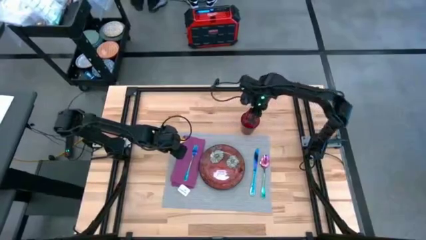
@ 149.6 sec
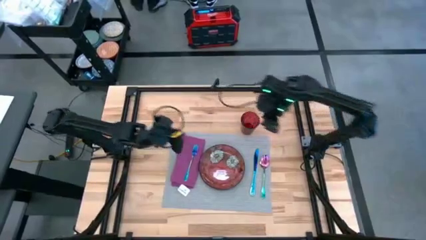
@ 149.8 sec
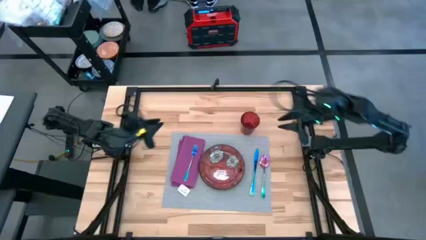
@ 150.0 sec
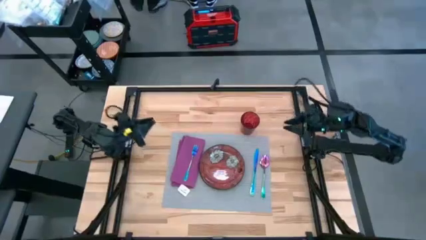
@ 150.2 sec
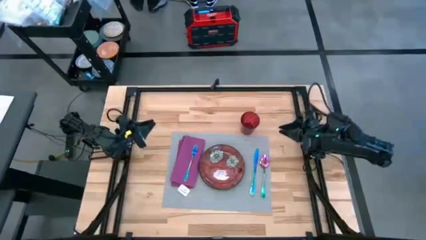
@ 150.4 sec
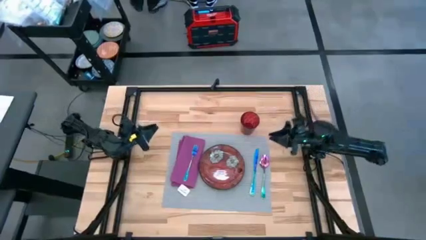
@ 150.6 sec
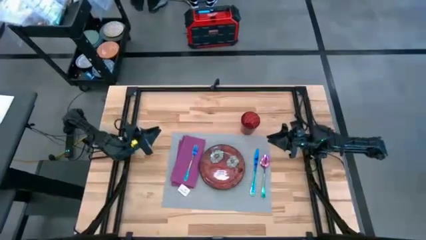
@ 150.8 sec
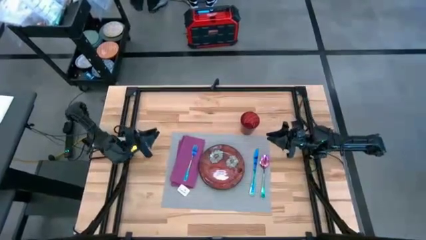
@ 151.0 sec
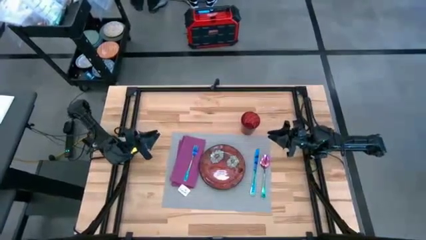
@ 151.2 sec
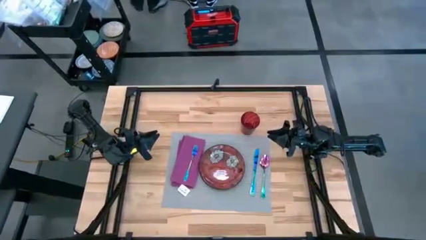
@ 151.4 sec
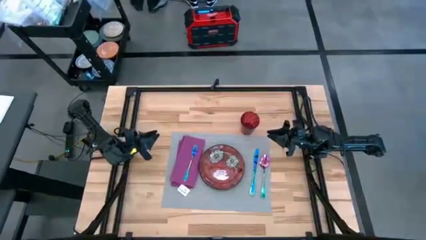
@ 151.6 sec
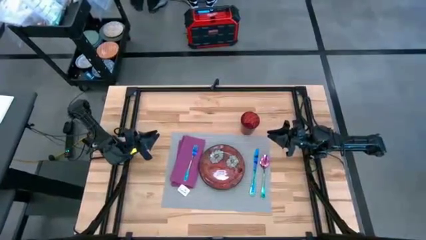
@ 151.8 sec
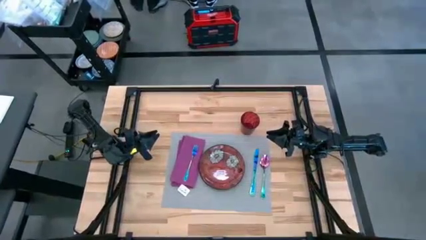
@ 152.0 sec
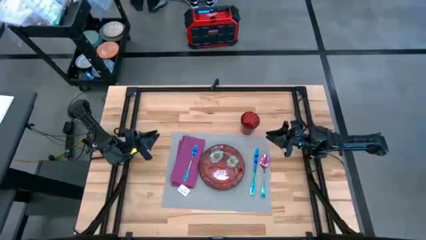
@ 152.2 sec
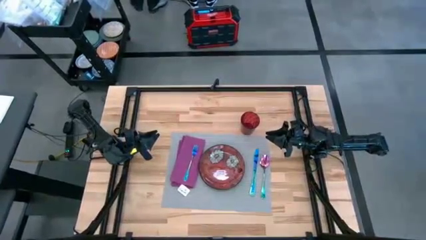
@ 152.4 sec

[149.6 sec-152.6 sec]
Task: Set table place
Return to Home Position

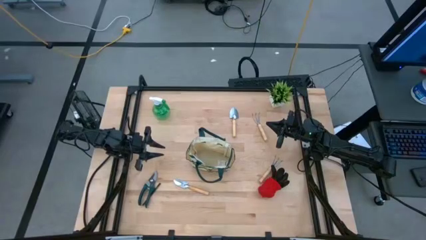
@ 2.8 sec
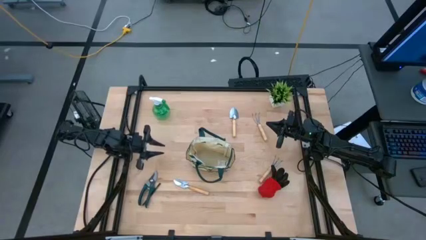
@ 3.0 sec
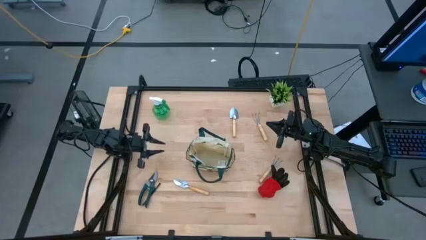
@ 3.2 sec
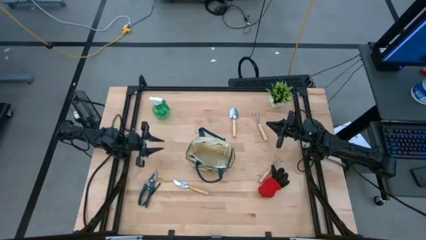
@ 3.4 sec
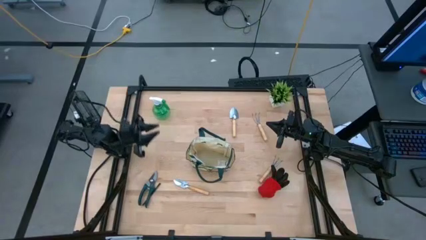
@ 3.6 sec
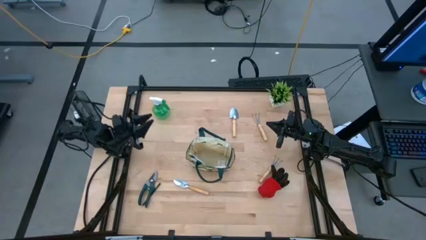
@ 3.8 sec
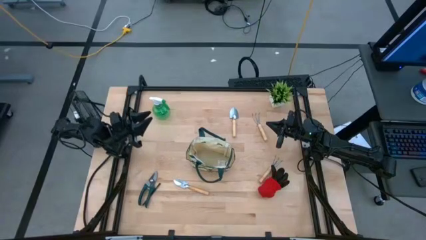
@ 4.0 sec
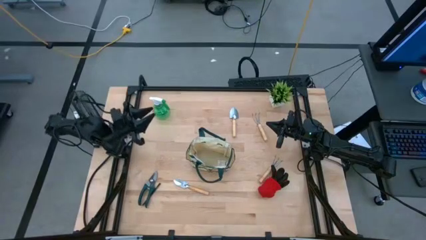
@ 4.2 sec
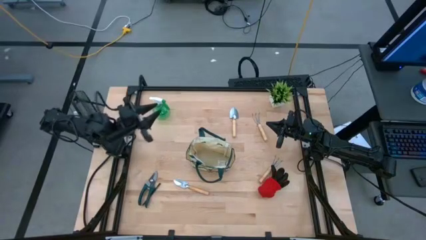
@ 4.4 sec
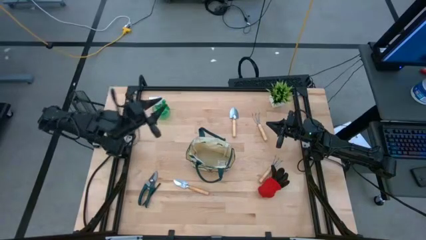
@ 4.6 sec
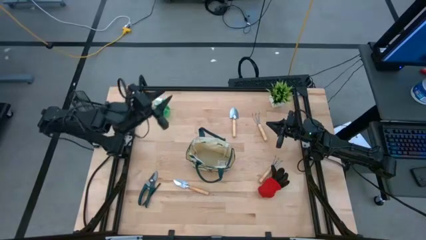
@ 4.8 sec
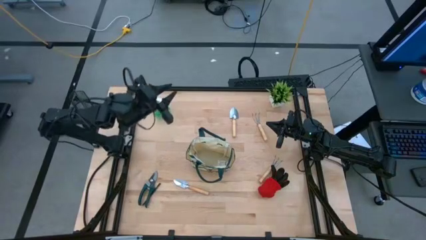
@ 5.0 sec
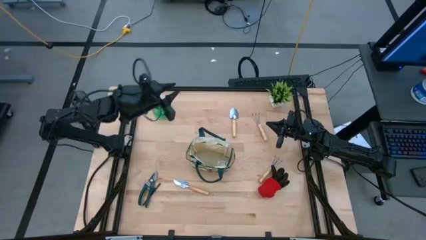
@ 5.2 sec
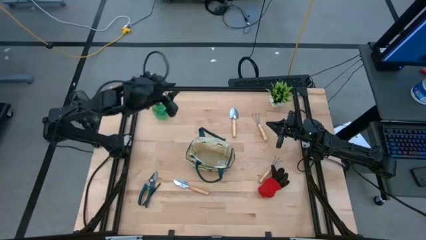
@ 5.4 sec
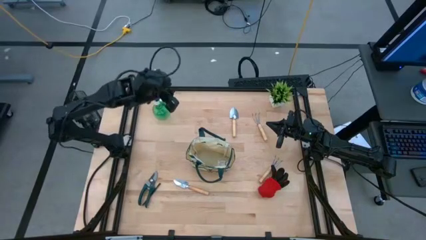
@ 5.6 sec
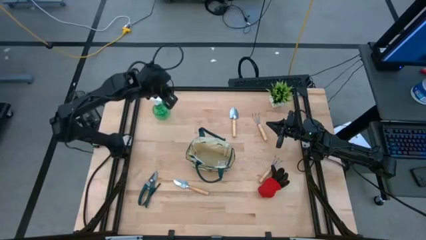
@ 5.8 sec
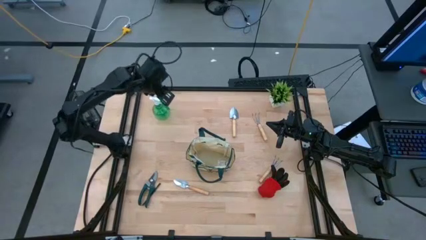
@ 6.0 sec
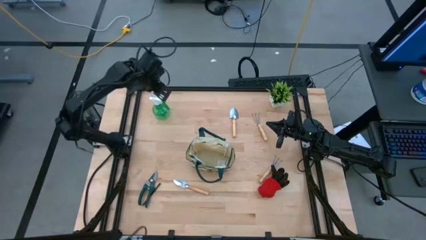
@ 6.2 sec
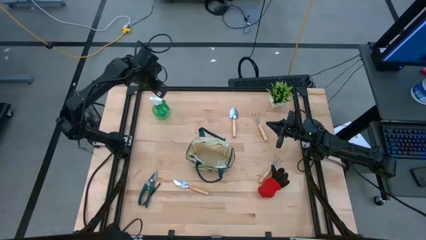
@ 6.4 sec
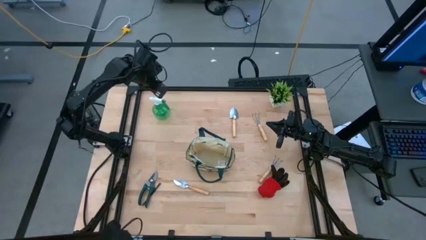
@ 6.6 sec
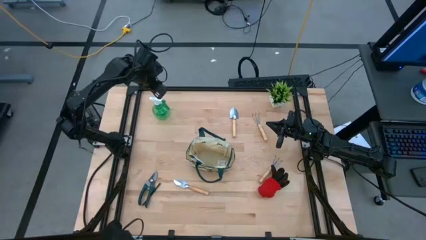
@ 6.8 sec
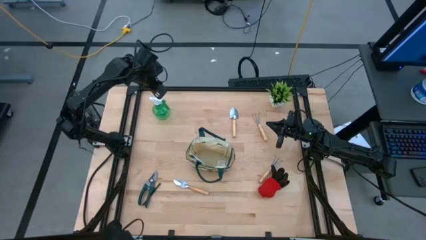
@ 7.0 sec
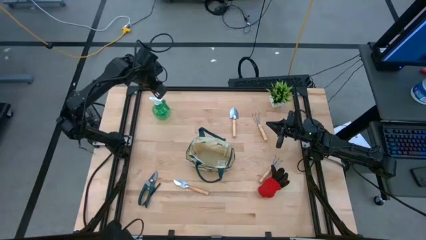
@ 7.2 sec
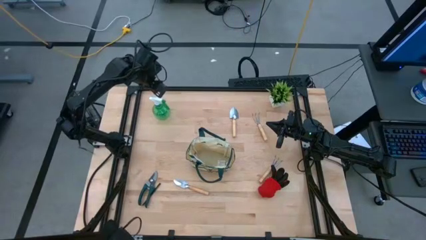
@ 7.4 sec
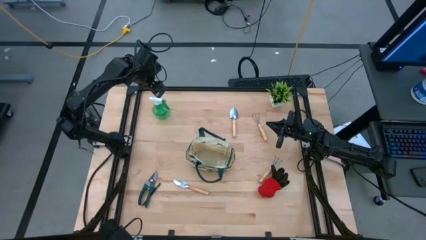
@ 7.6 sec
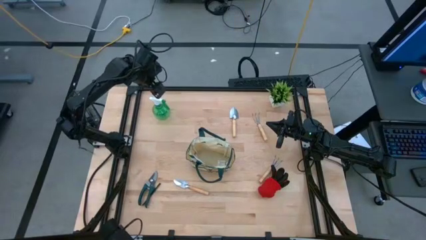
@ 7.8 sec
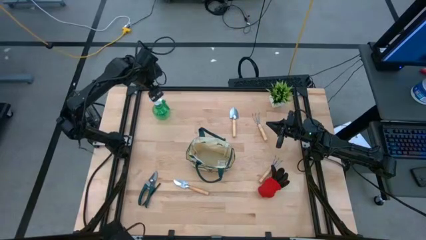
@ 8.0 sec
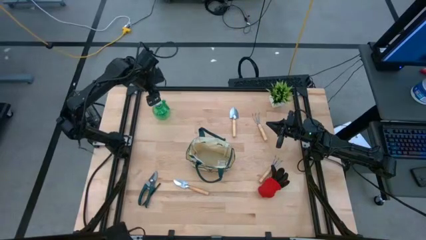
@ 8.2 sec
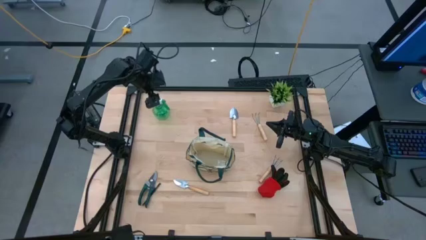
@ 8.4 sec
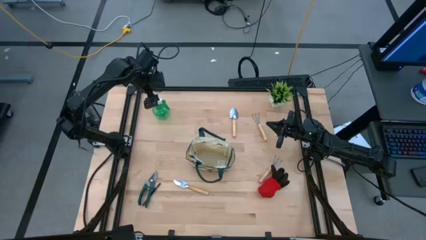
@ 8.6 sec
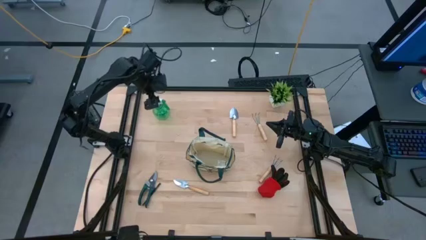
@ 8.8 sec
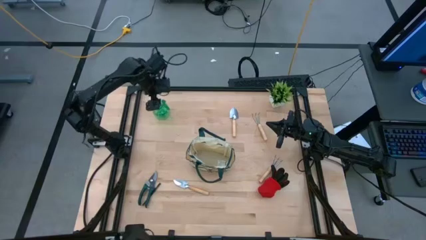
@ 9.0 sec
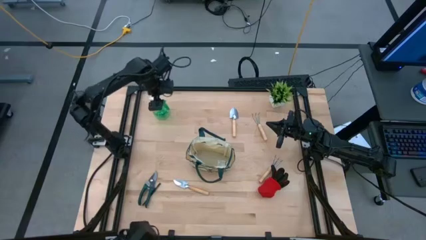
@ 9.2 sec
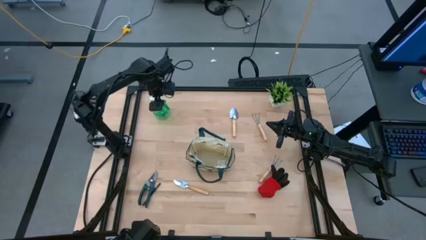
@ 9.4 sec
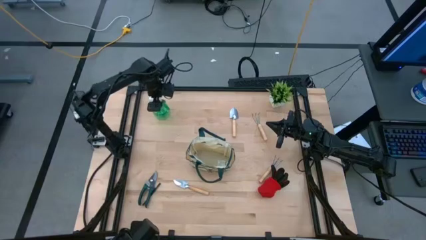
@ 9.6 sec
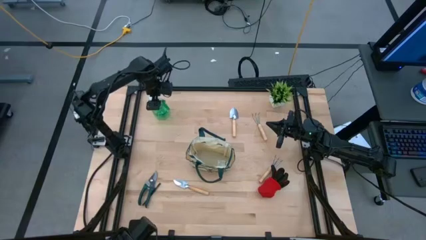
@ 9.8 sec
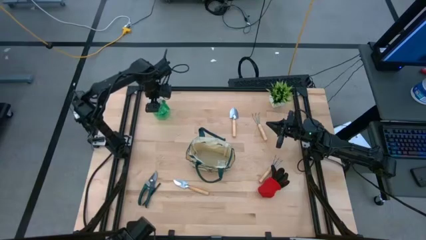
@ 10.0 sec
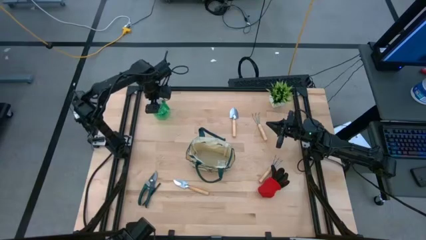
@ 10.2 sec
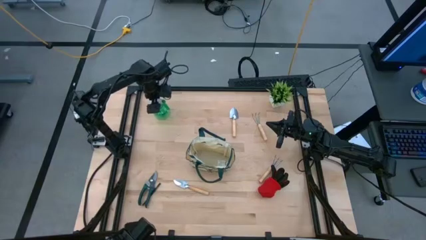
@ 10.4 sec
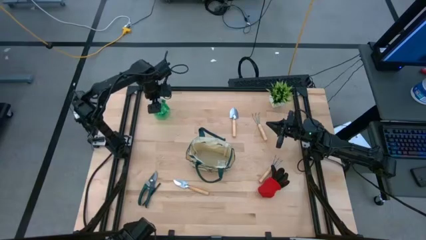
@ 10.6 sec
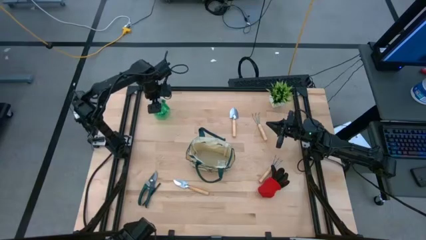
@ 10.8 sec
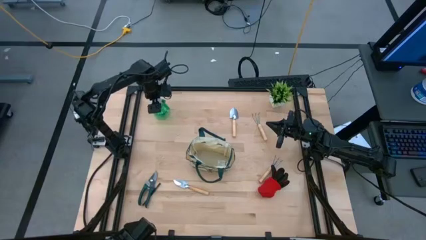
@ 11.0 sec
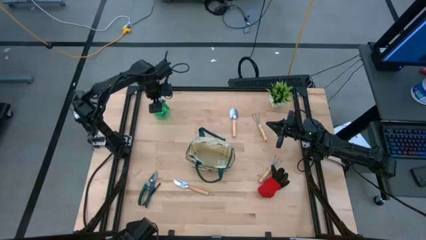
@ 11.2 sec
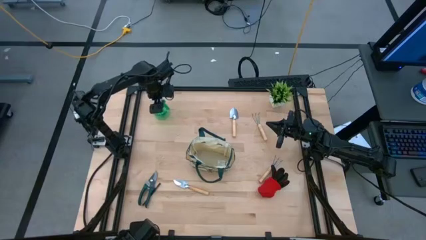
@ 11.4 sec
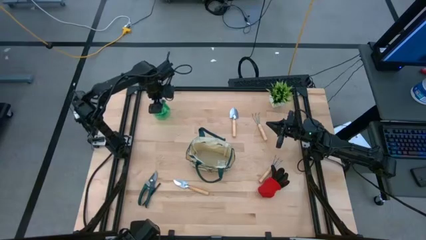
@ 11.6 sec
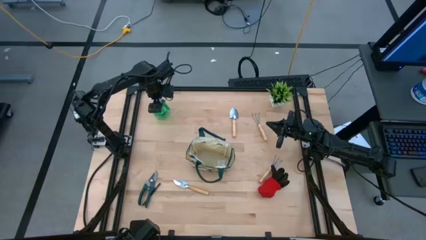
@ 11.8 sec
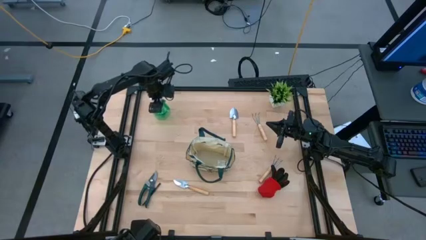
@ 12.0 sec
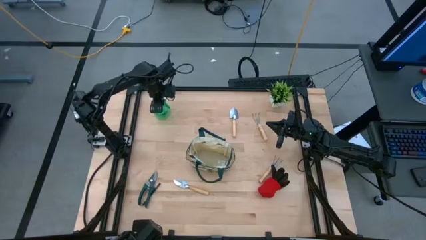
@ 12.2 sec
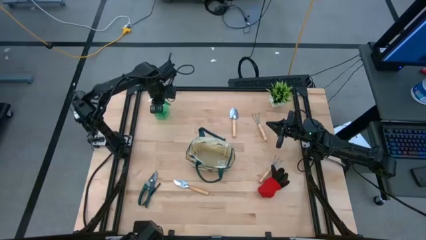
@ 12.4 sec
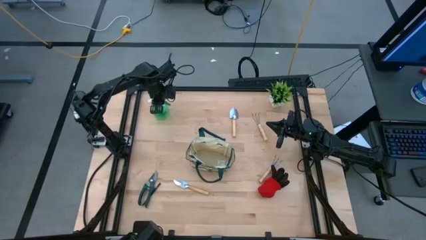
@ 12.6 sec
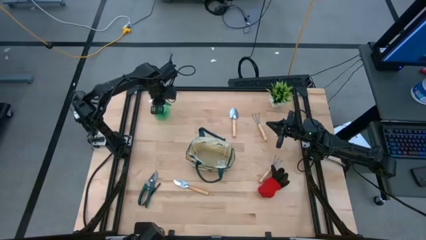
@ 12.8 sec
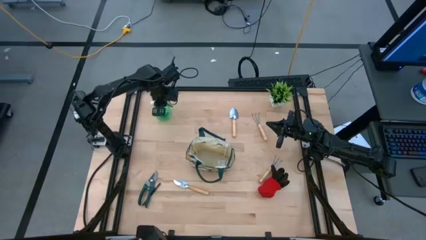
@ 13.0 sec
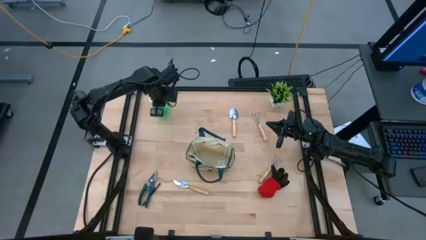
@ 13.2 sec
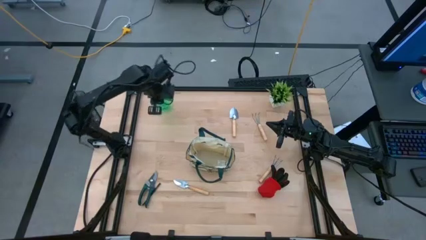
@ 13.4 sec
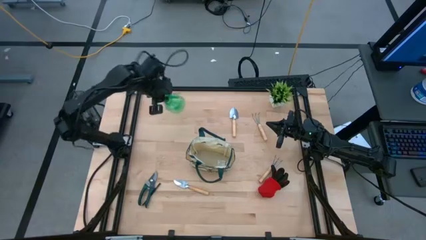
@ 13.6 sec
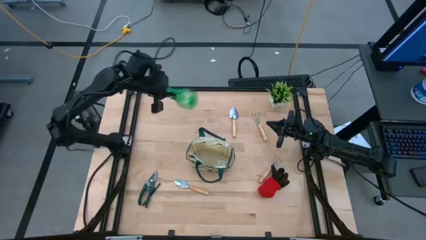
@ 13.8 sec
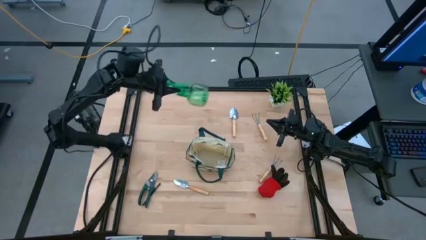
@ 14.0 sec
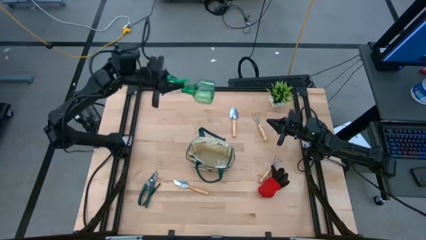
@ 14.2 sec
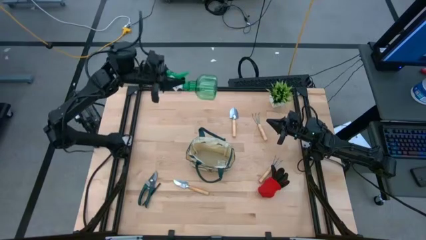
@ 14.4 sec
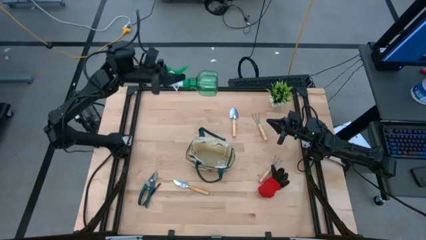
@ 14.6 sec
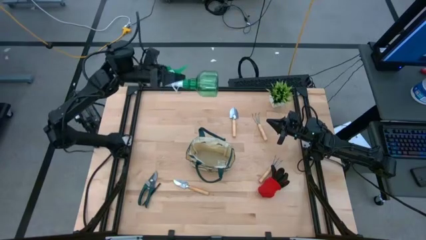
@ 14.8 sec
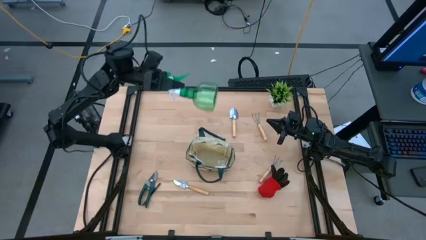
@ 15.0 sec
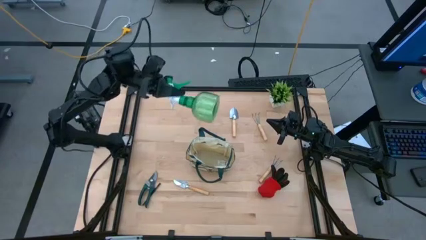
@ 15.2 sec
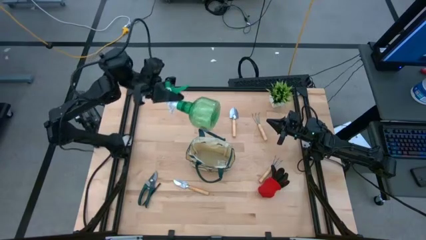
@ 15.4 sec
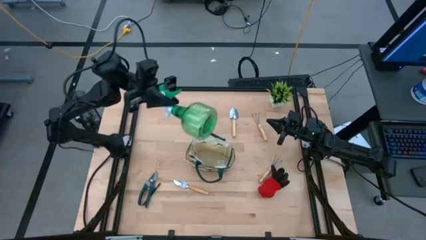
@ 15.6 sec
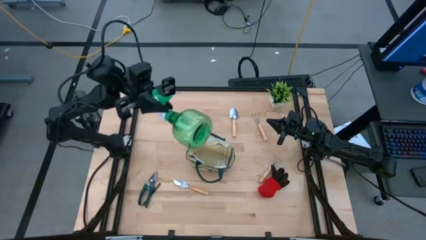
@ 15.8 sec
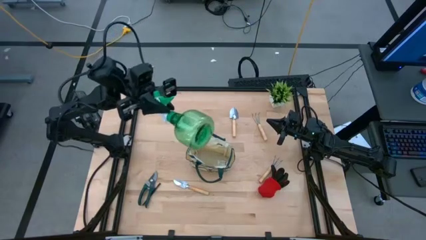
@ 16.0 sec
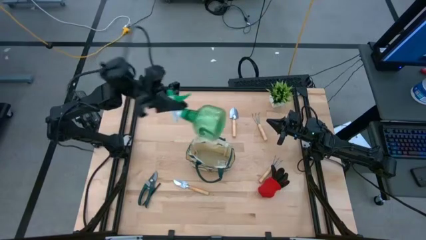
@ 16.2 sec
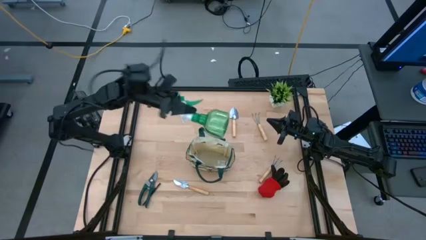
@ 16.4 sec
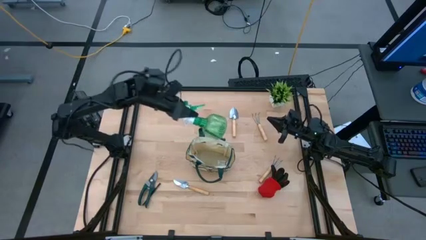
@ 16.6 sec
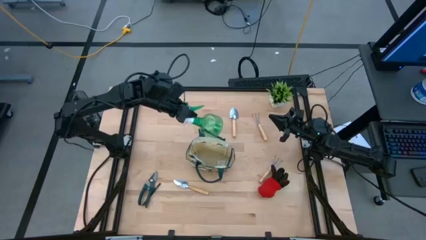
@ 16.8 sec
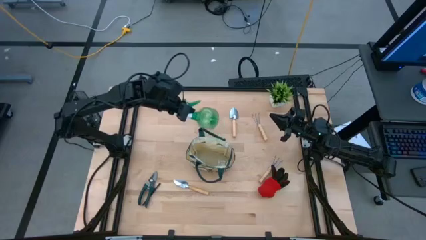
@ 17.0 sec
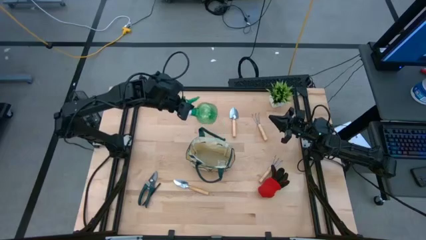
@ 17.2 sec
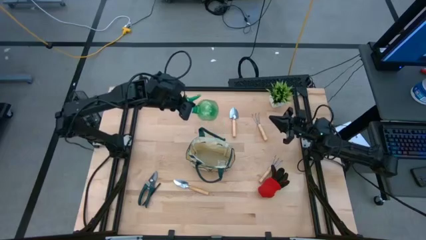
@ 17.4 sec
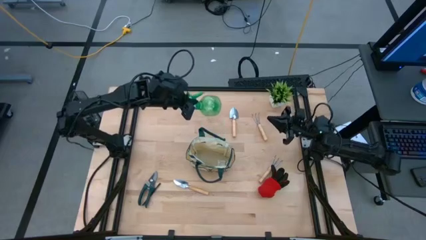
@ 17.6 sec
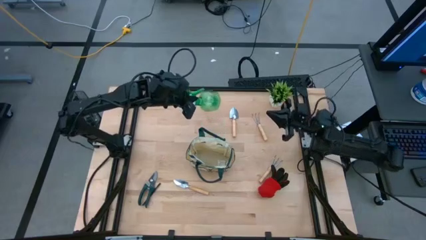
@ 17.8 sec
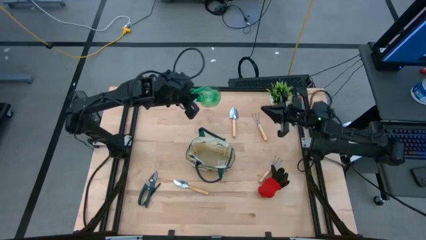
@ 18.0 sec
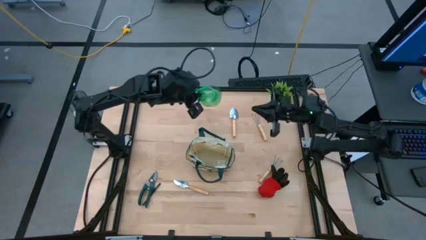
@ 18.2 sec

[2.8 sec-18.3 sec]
Task: Pick & Place Garden tools in Gardening bag
Put the green spray bottle into the gardening bag
